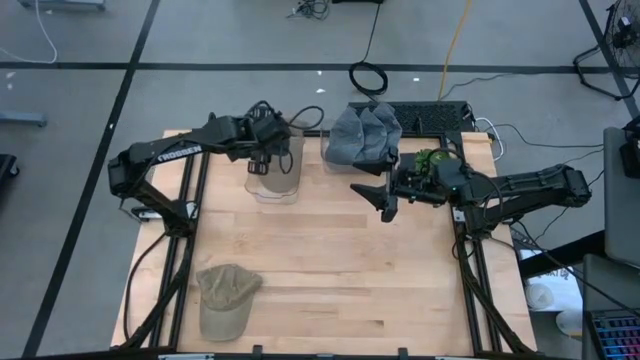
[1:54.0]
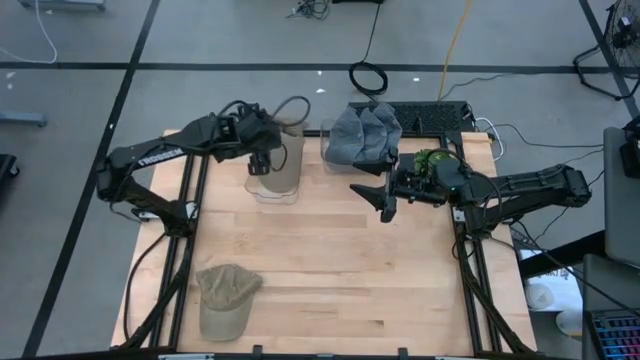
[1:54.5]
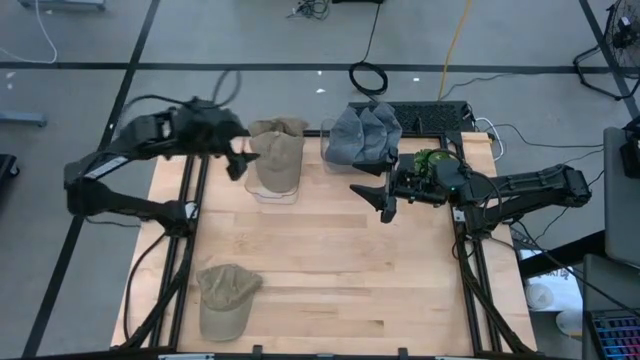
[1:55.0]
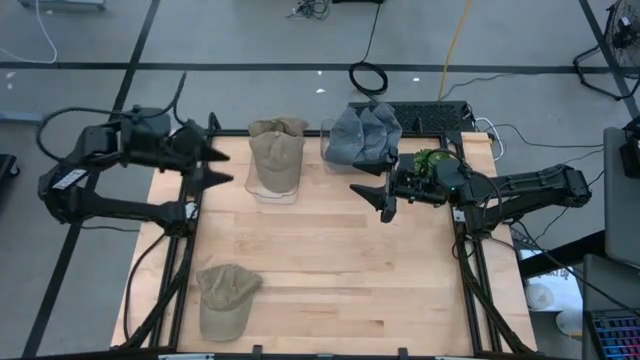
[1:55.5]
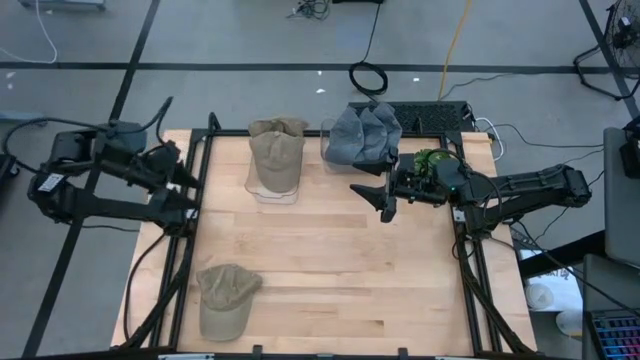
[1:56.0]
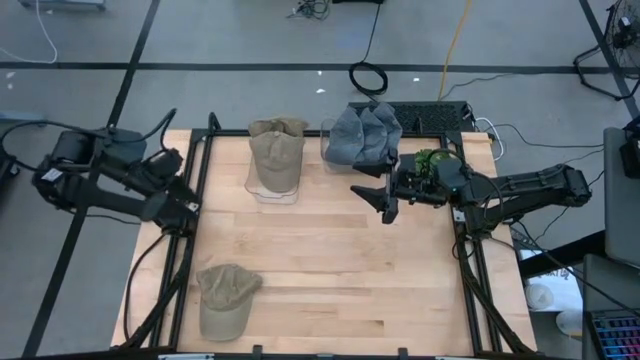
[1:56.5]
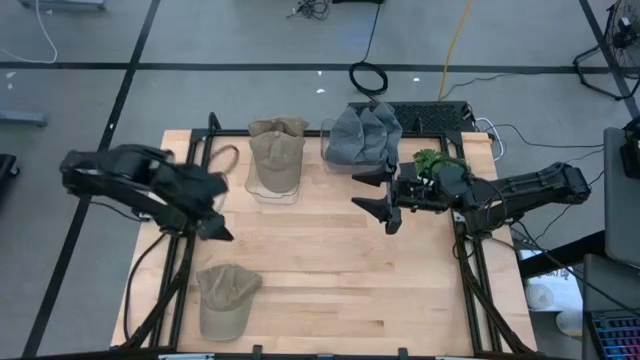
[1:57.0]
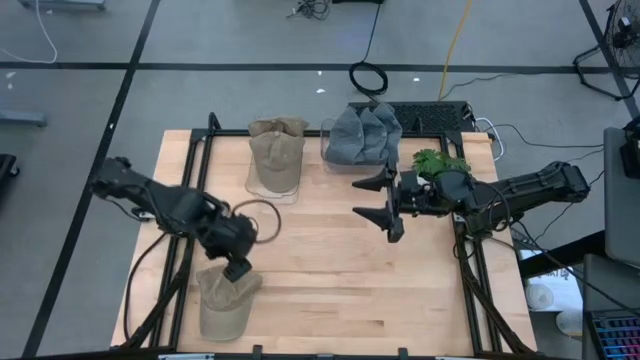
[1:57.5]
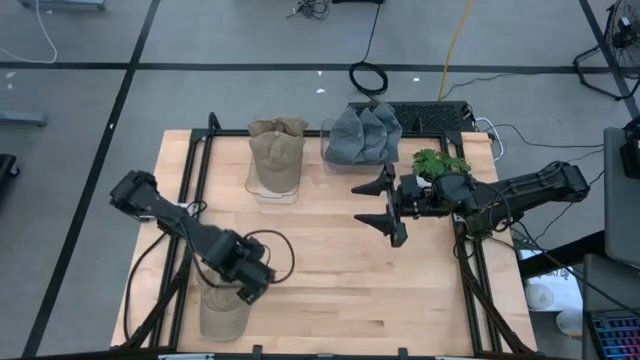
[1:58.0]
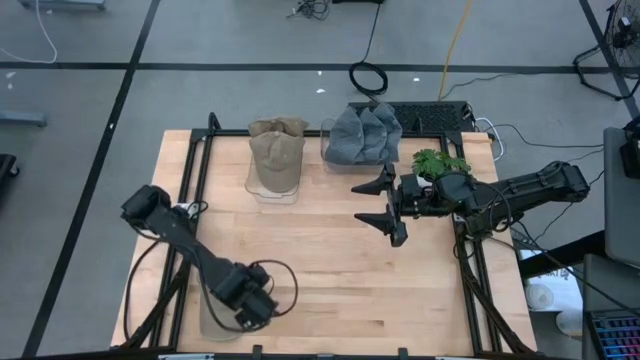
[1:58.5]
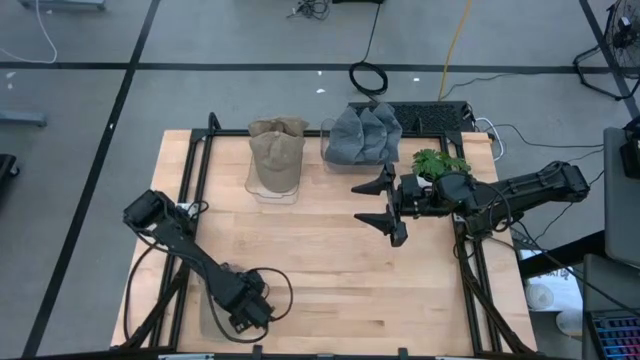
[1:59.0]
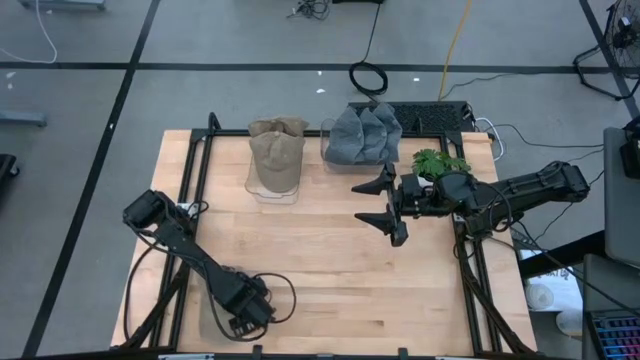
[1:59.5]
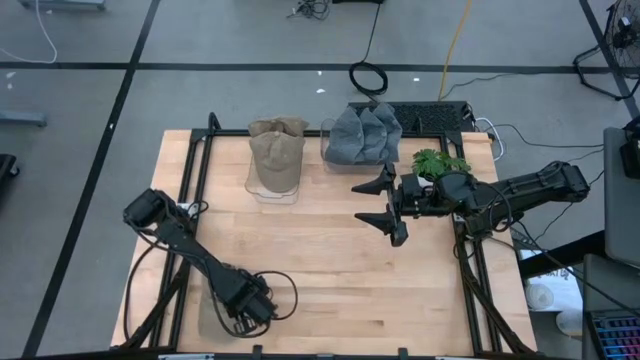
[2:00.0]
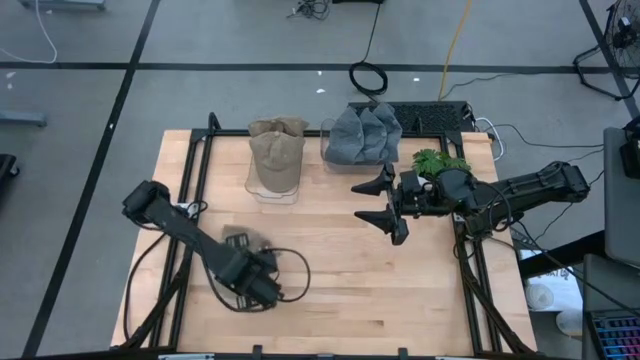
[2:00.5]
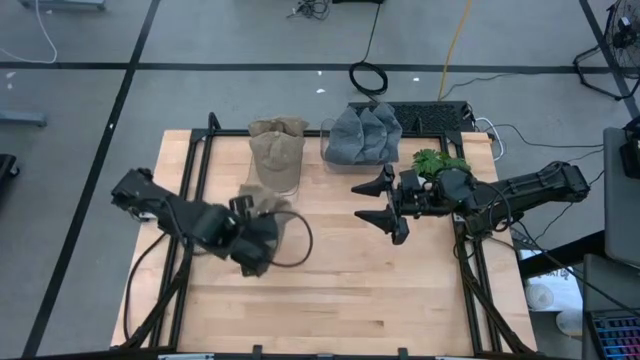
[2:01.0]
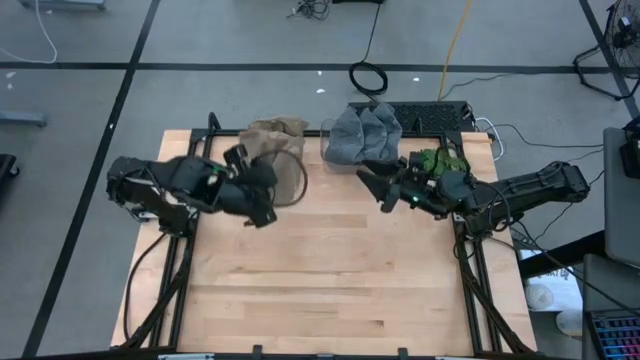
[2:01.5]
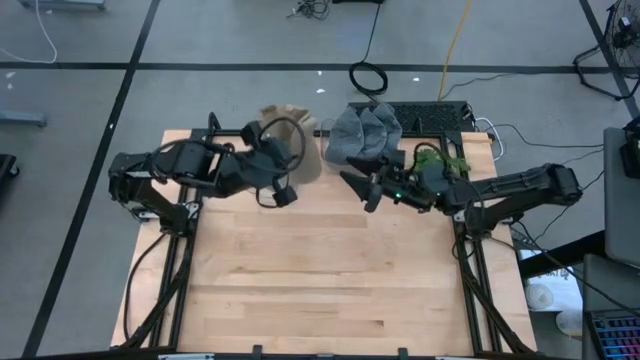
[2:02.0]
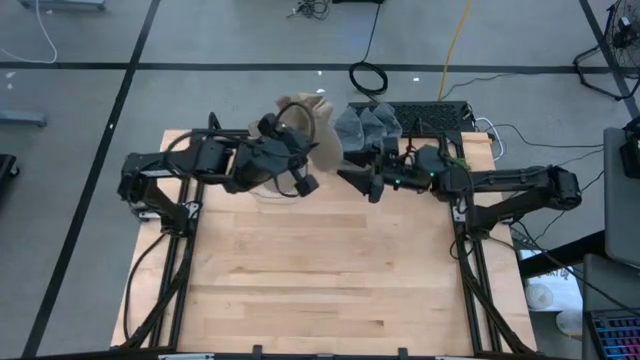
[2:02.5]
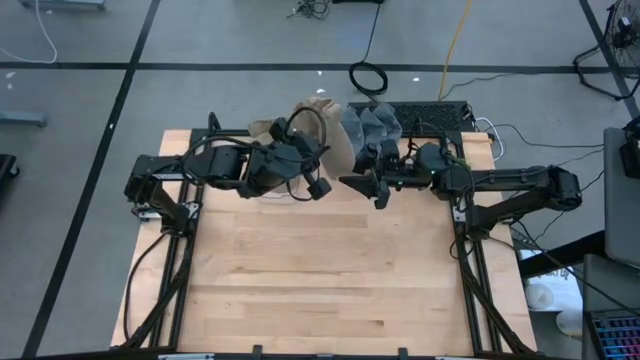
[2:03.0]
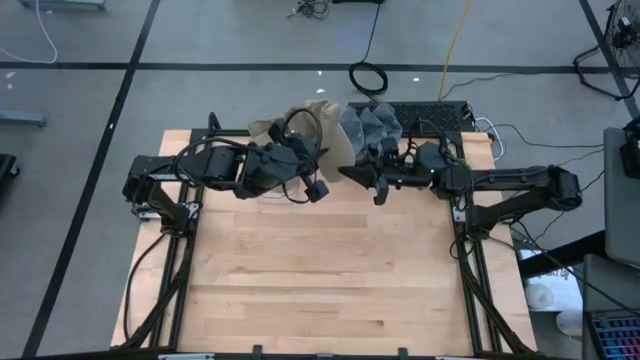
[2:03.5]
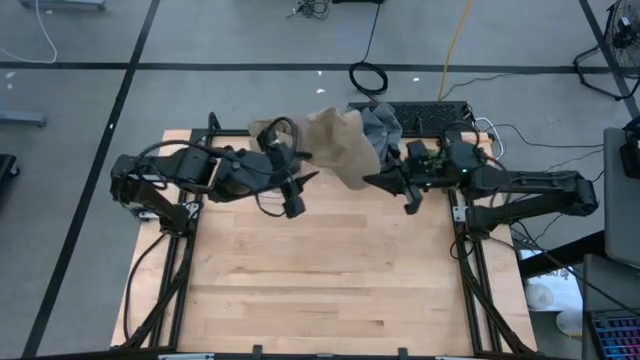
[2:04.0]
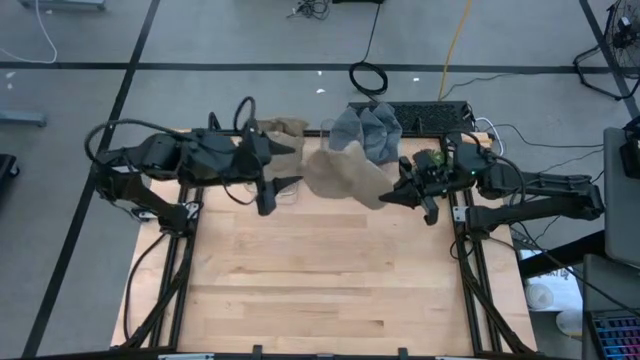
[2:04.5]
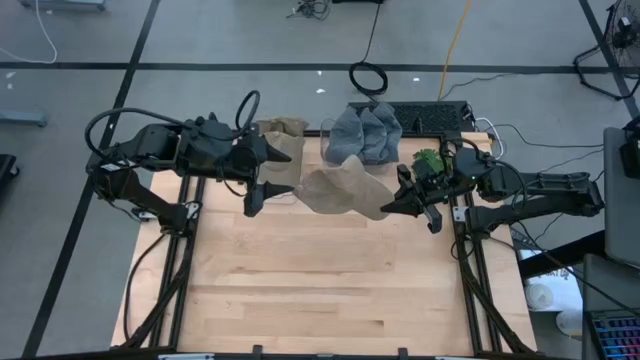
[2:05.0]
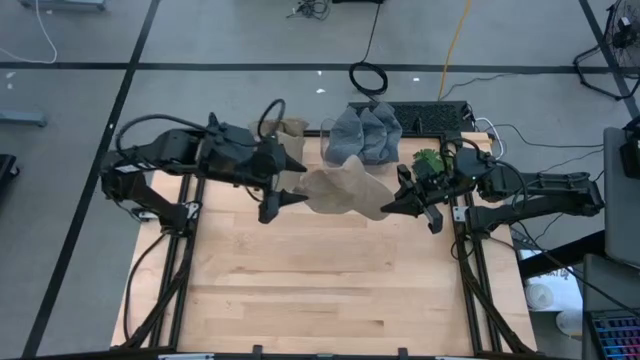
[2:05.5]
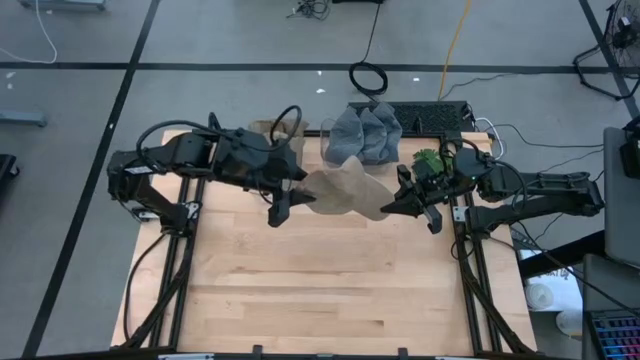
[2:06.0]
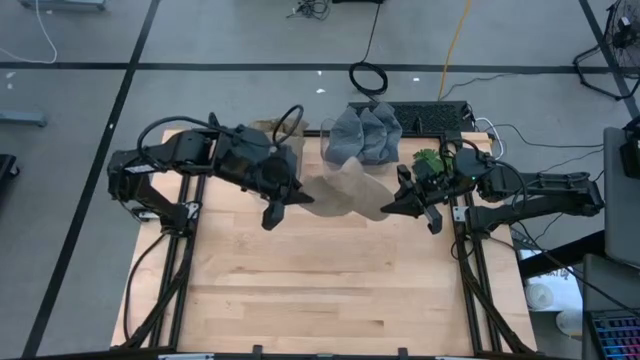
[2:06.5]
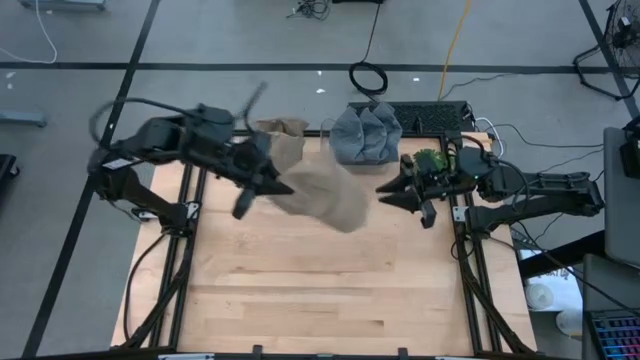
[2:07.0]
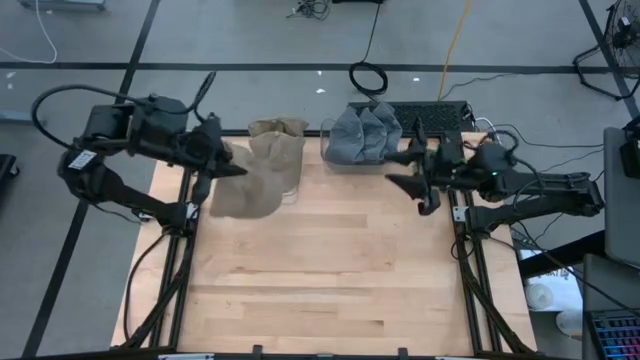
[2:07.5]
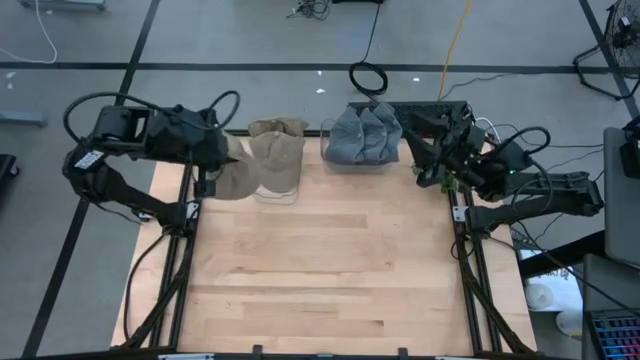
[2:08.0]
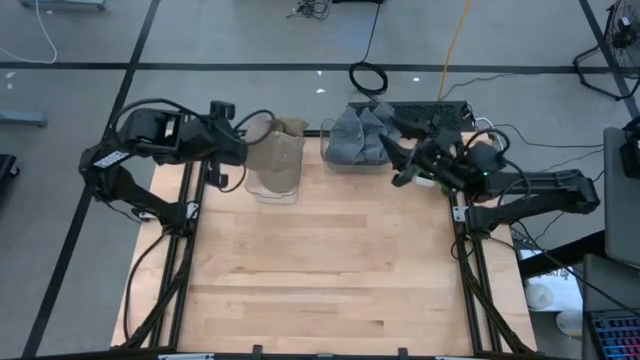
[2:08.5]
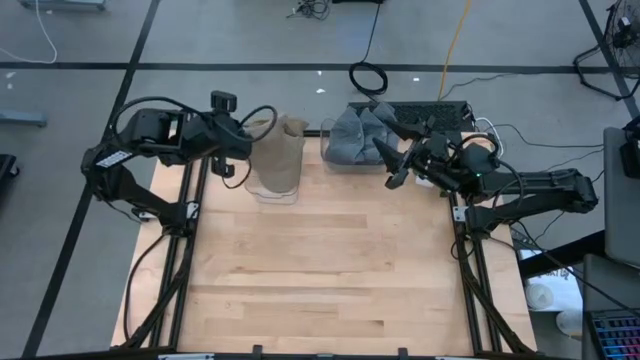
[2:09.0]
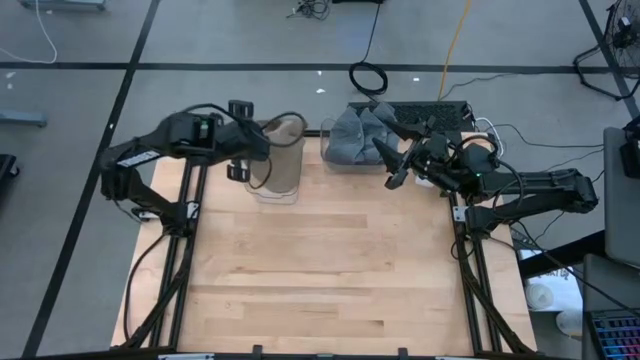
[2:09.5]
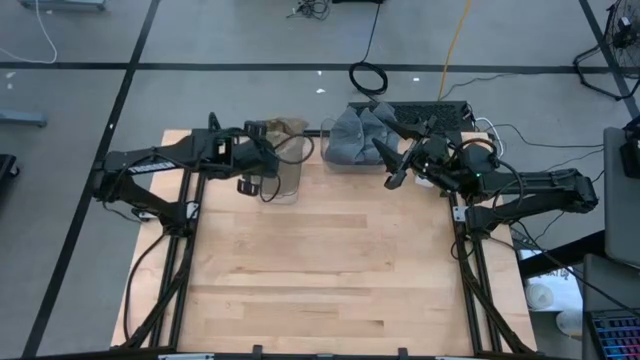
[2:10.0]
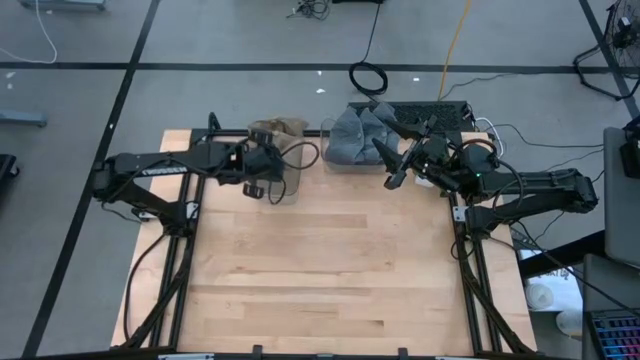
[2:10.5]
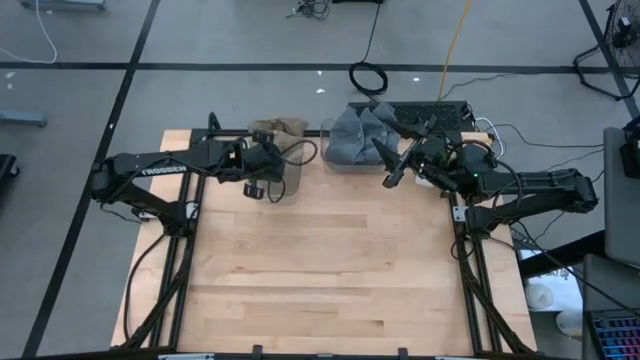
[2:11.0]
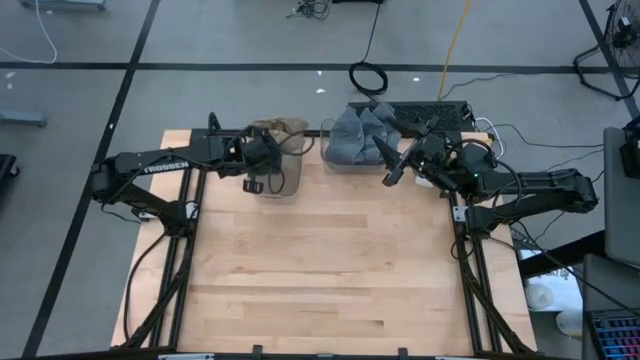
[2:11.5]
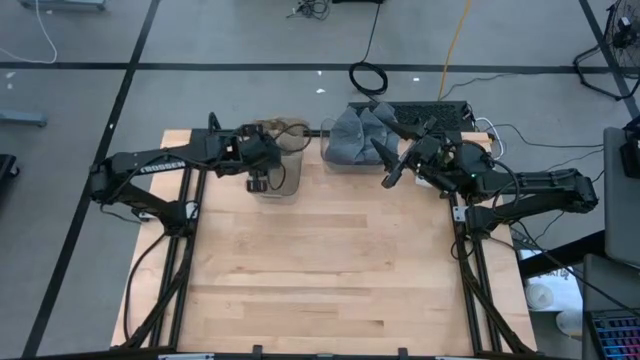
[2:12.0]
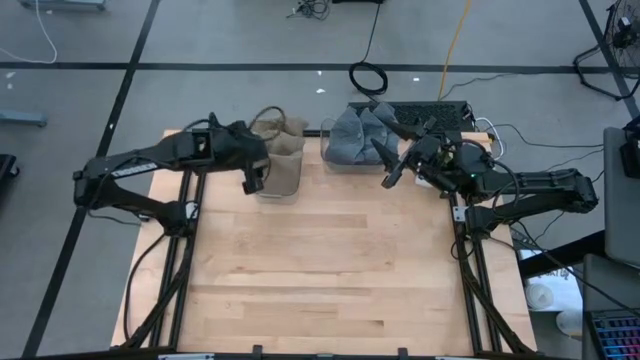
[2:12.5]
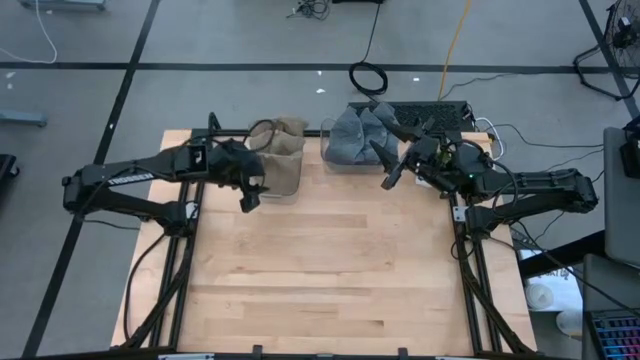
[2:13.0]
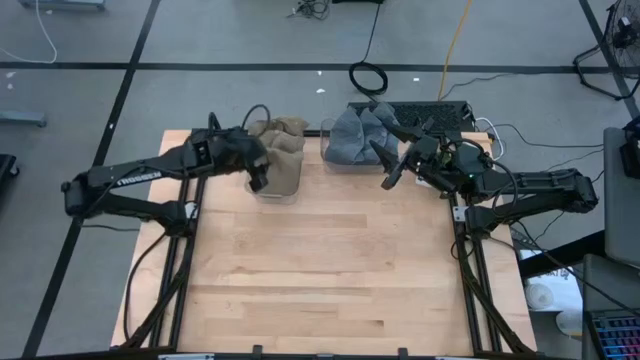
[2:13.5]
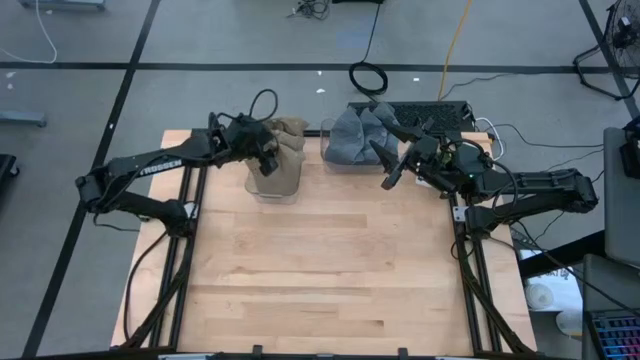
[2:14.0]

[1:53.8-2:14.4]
Task: Pick & Place hat
Put the brown cap into the left transparent bin

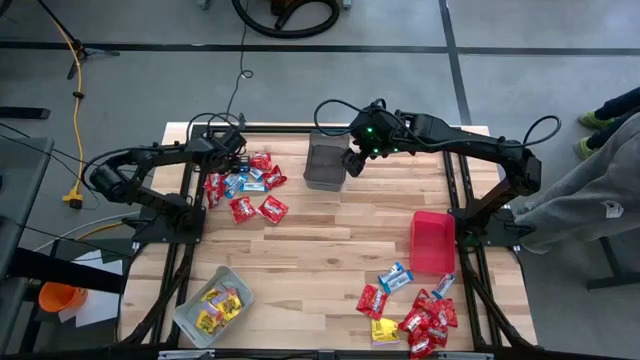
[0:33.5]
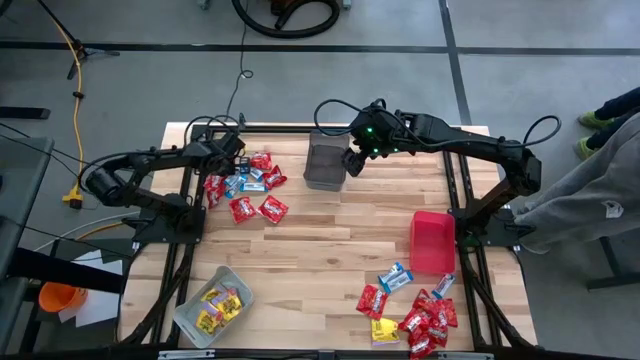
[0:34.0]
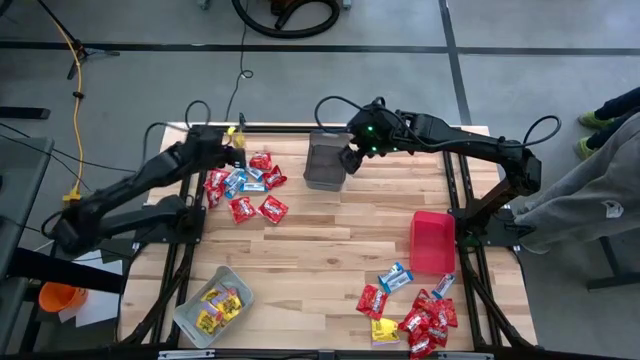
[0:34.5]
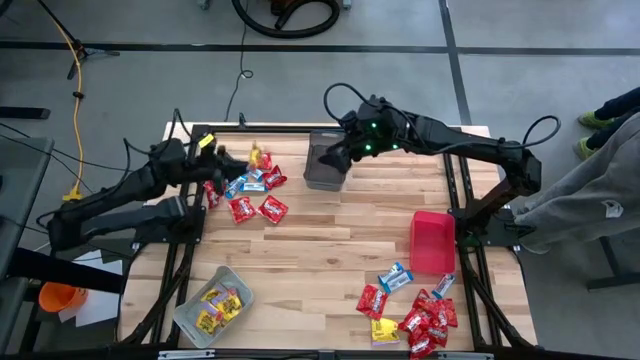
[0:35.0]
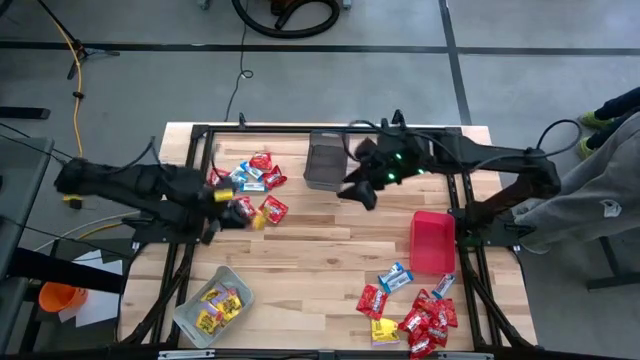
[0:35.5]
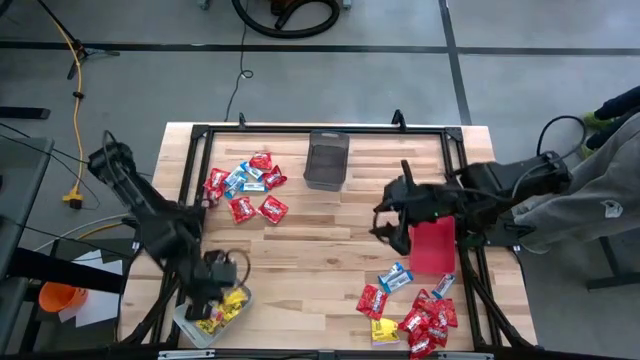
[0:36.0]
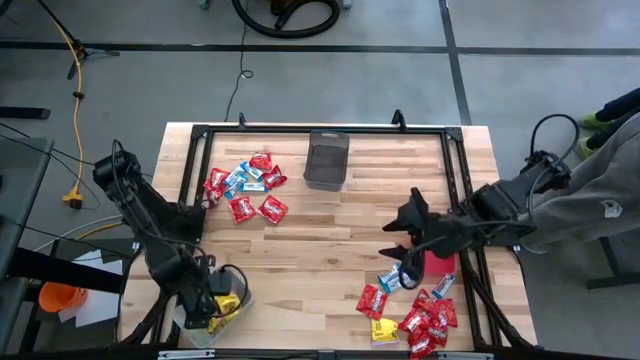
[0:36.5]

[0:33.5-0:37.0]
Task: Sort candy
Put the yellow candy pack into the gray bin
